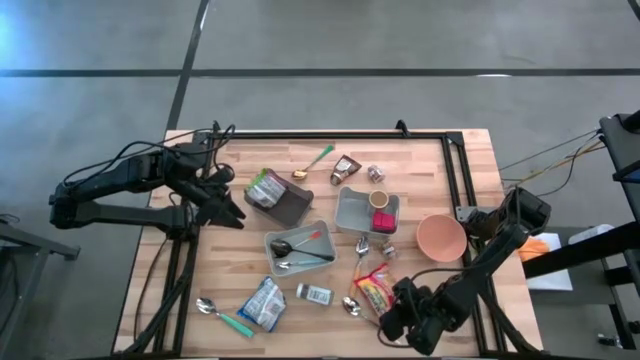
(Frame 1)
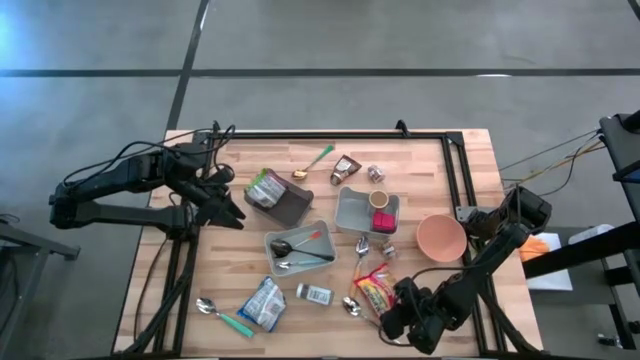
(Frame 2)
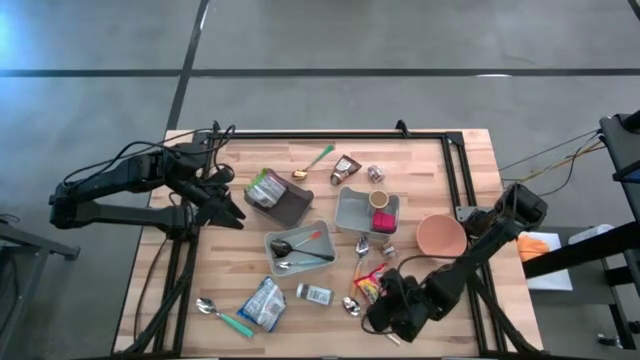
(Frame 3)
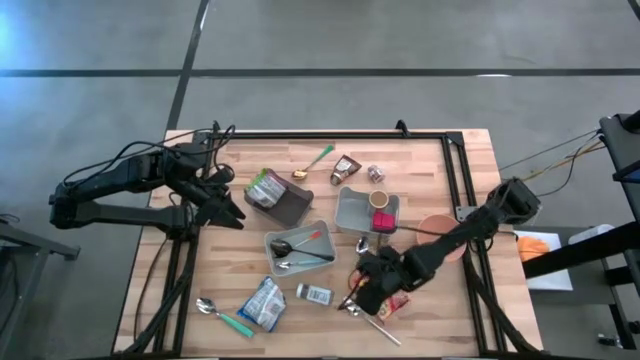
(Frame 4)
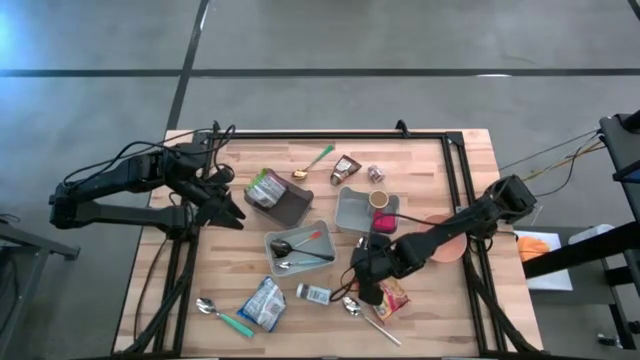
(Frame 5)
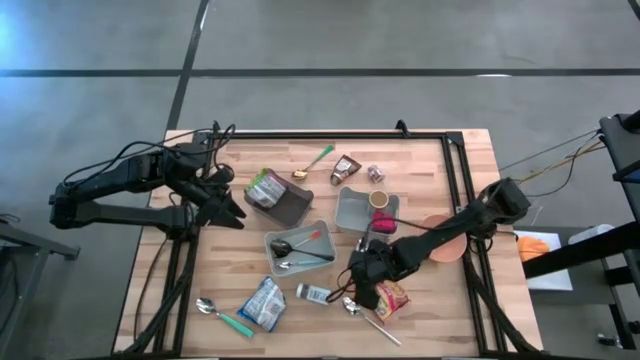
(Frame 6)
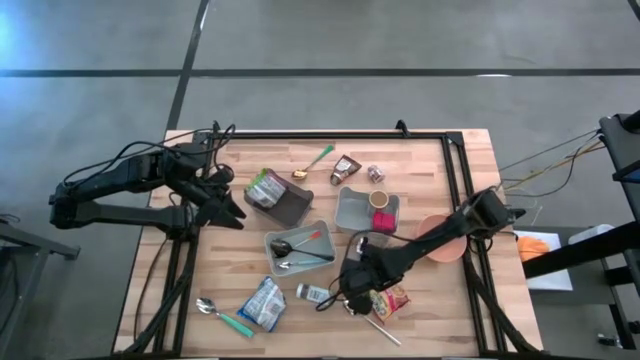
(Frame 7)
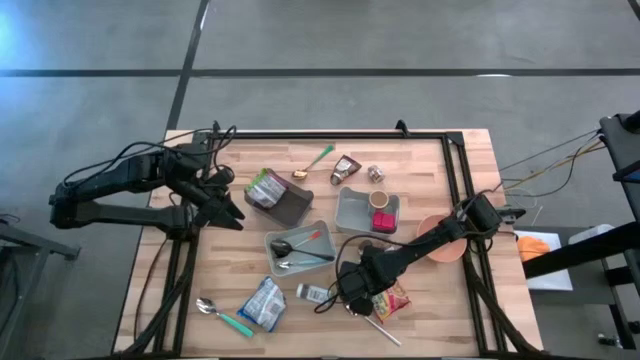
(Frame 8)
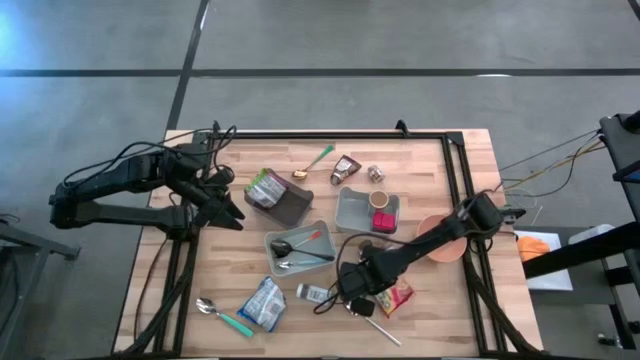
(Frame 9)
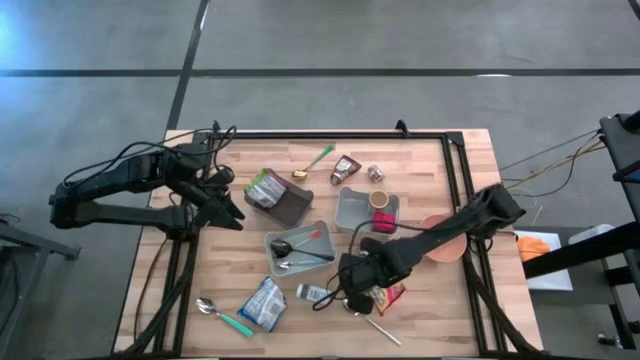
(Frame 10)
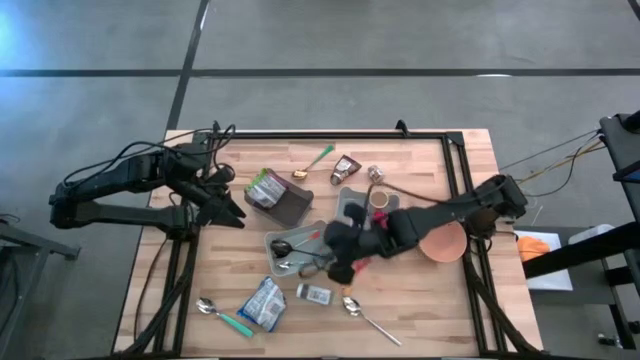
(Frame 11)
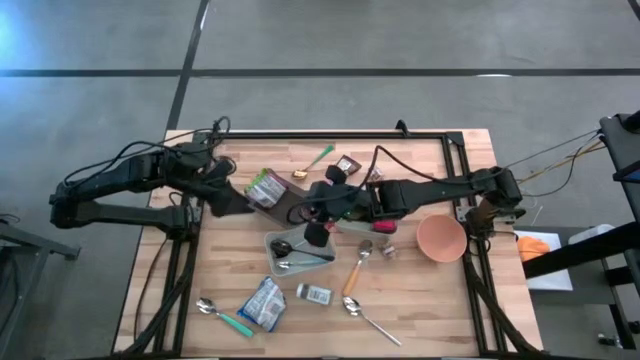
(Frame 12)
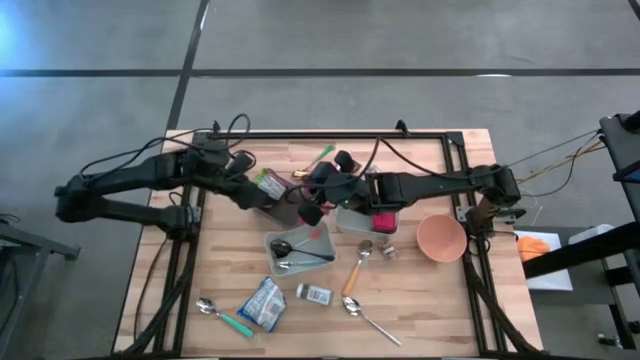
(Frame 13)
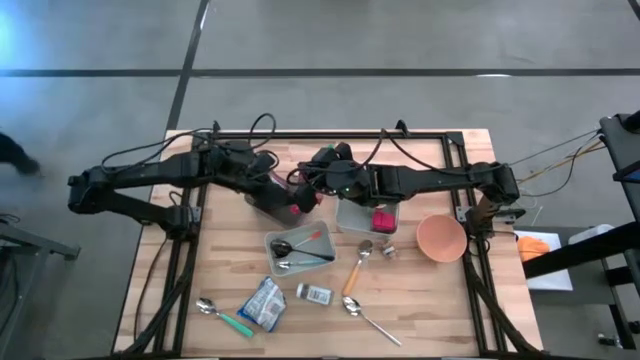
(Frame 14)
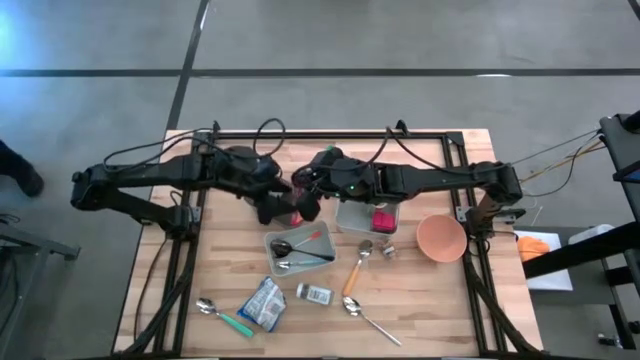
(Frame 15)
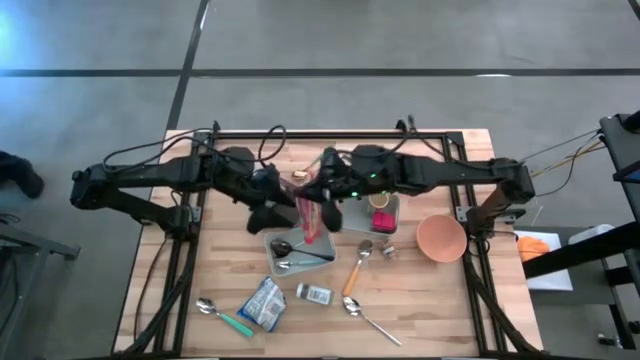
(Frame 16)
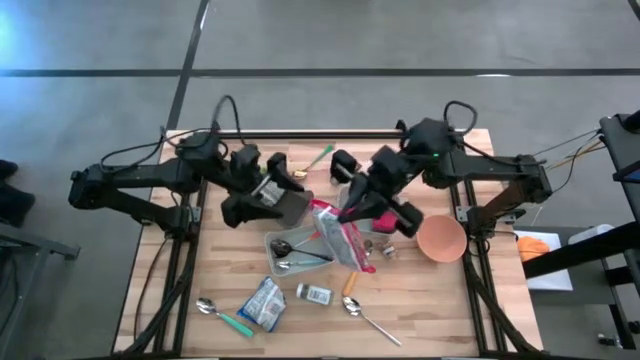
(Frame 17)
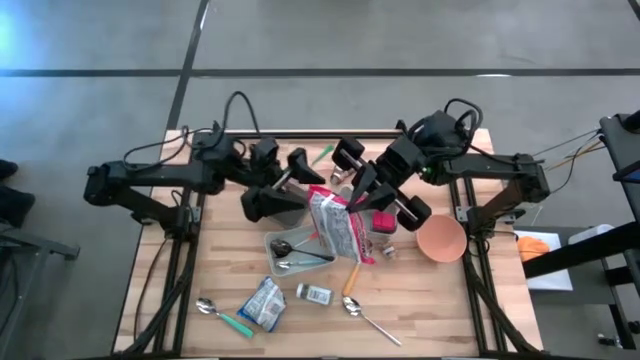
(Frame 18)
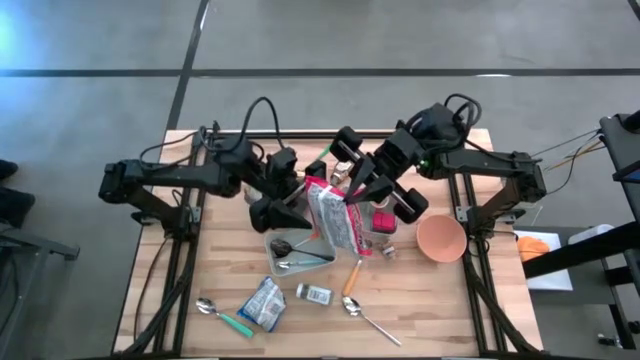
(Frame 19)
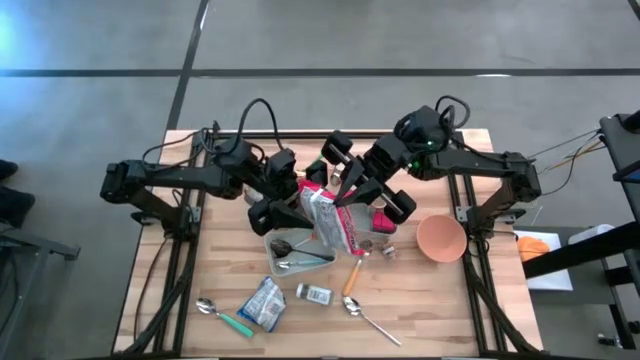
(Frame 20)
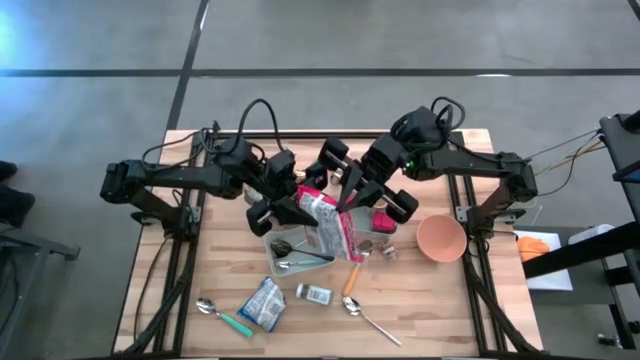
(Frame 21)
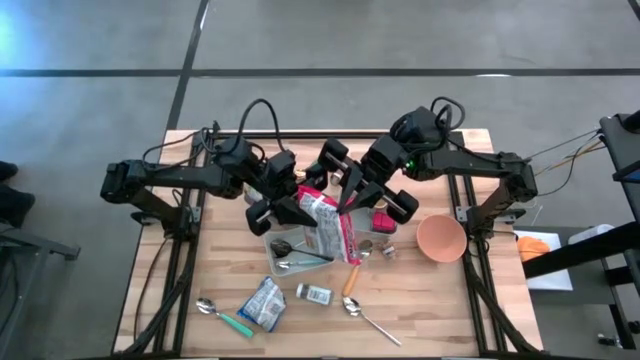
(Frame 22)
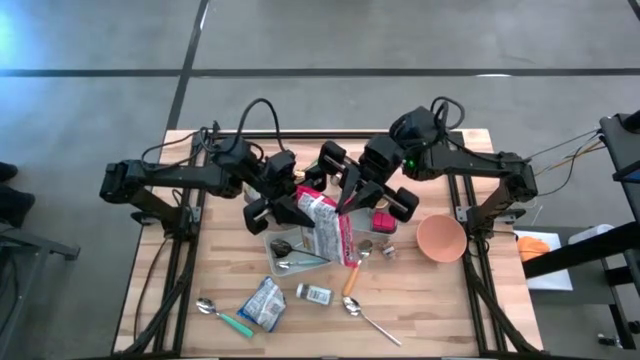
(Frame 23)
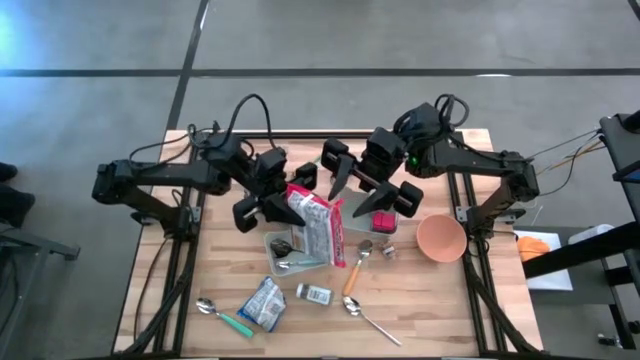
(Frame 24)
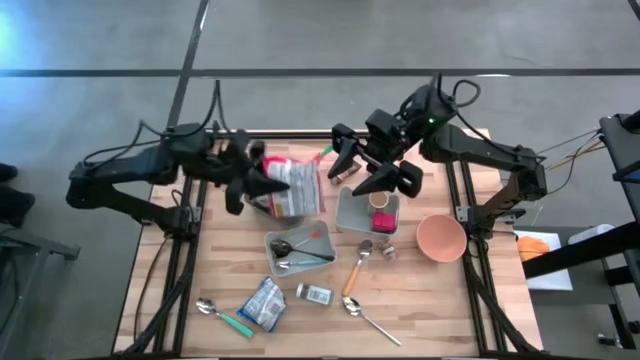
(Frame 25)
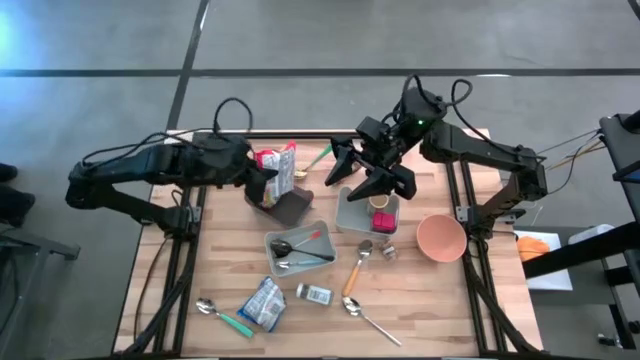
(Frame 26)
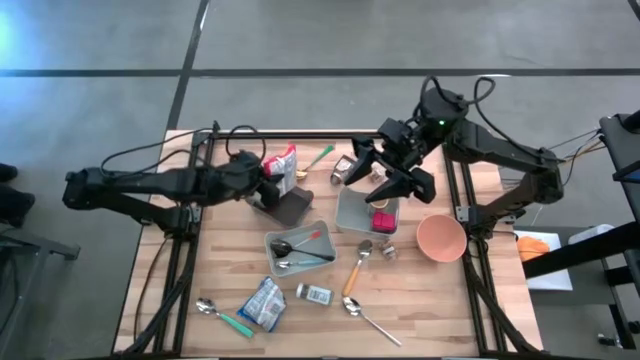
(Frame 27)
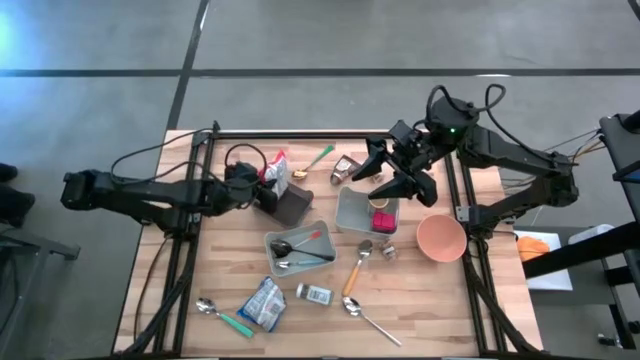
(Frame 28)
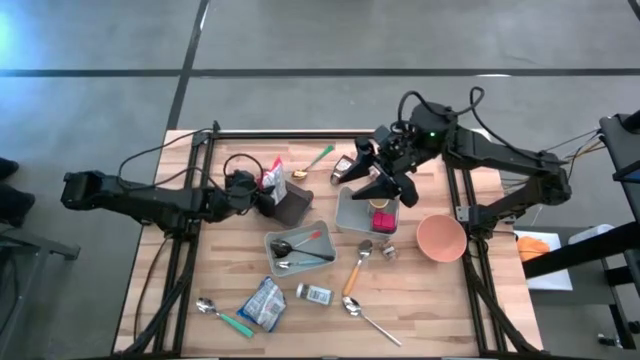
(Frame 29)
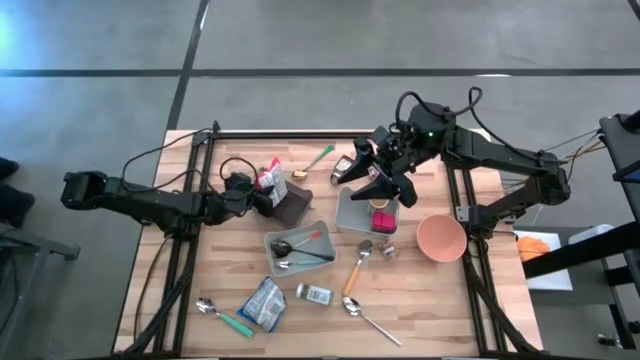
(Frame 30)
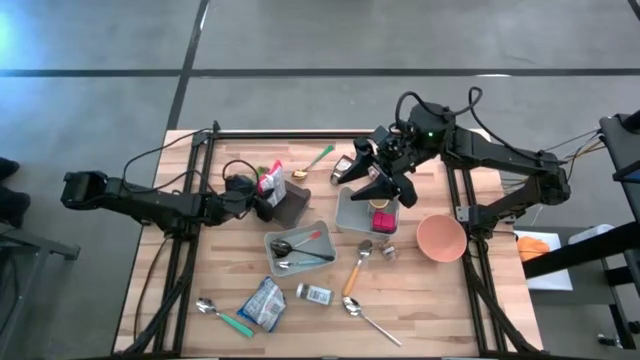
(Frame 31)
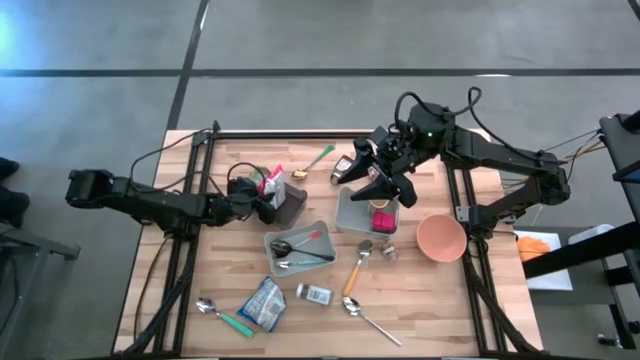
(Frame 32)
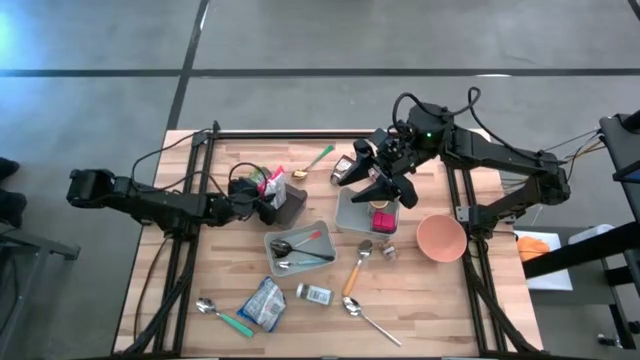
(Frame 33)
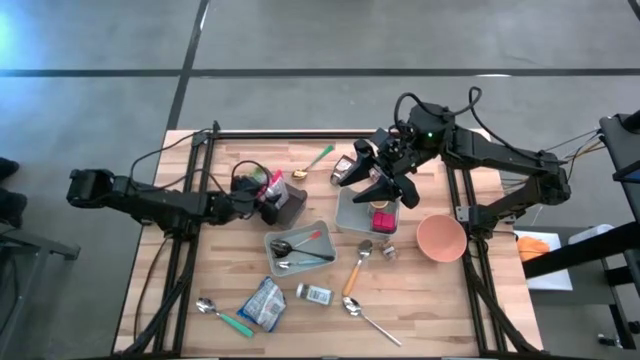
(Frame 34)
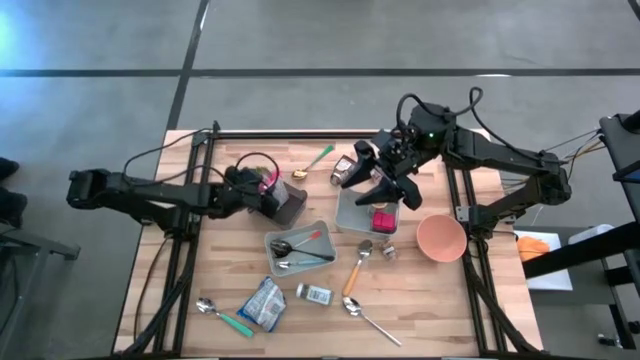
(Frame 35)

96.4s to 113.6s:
Put the red noodle pack into the black bin
